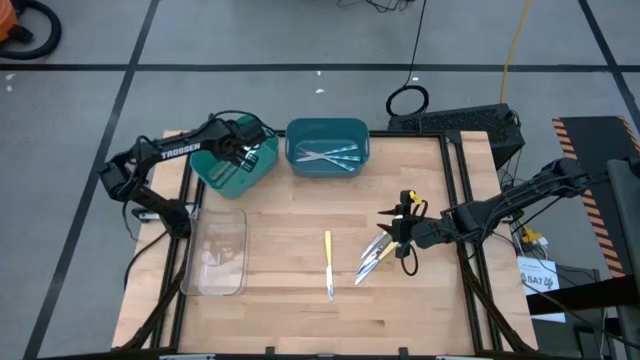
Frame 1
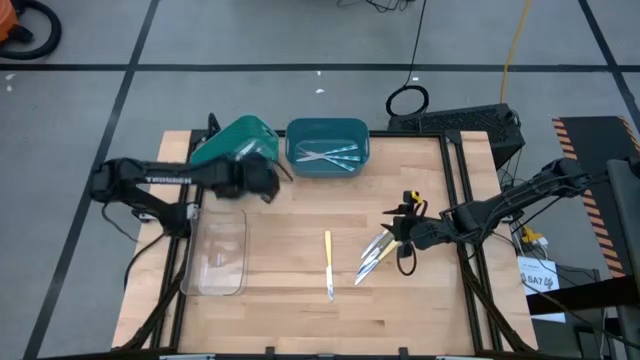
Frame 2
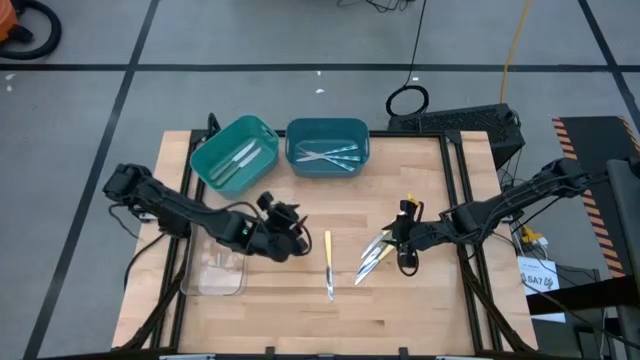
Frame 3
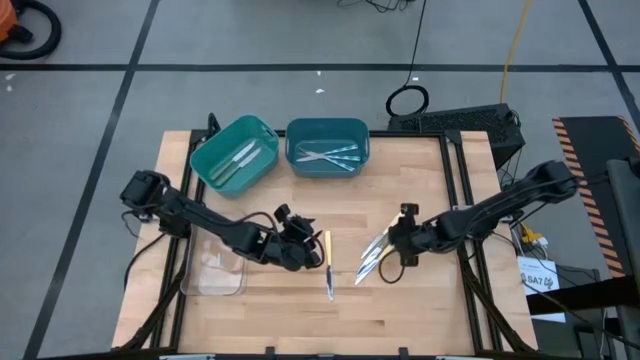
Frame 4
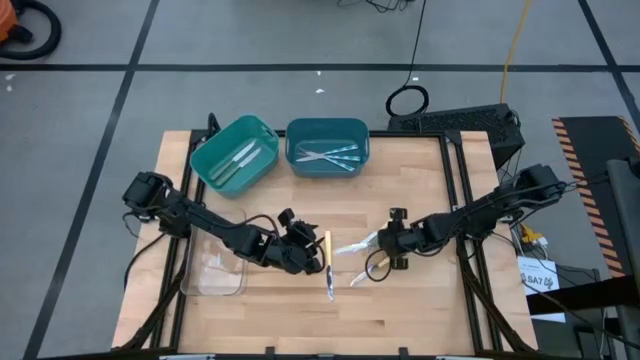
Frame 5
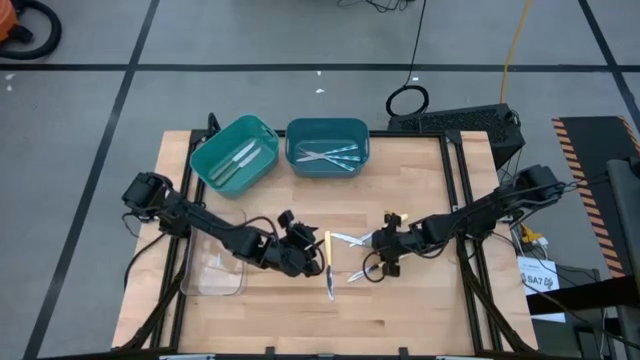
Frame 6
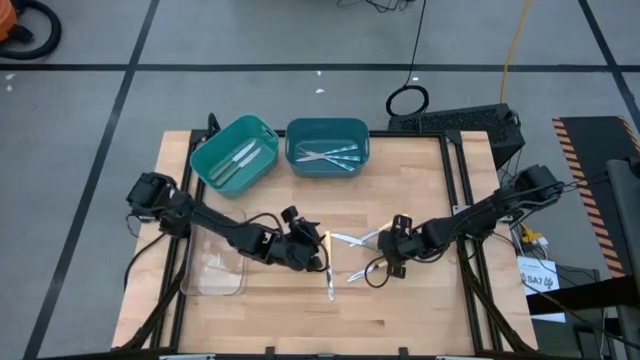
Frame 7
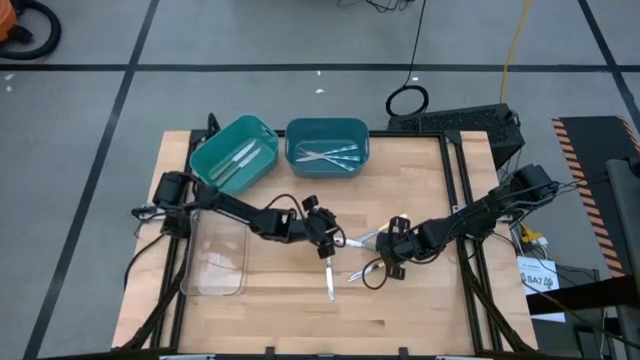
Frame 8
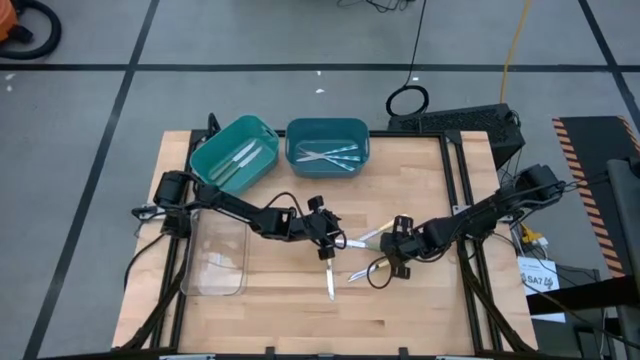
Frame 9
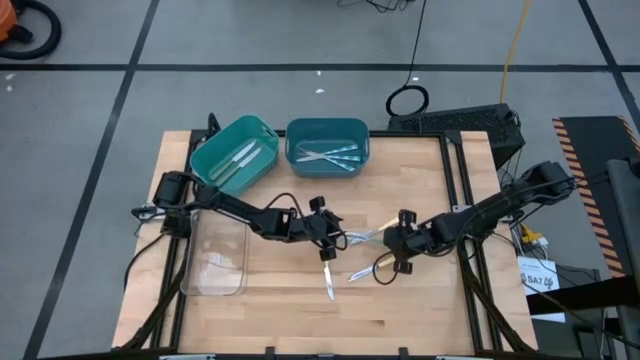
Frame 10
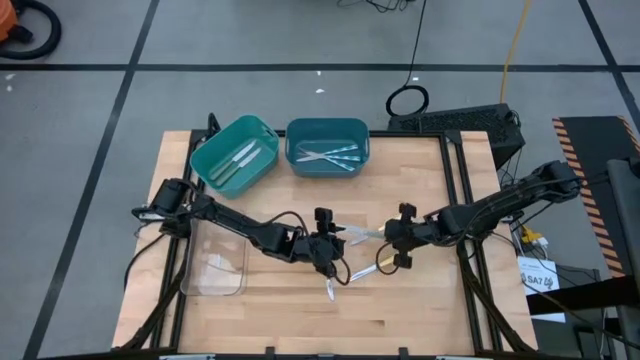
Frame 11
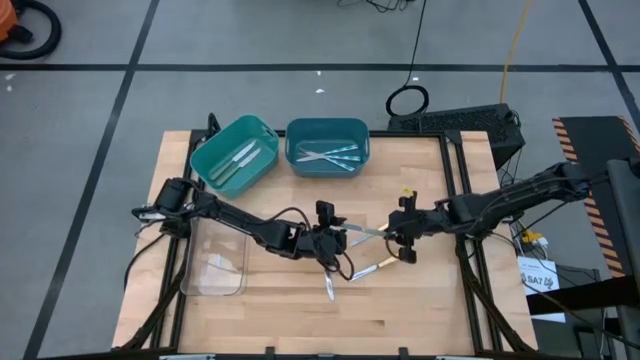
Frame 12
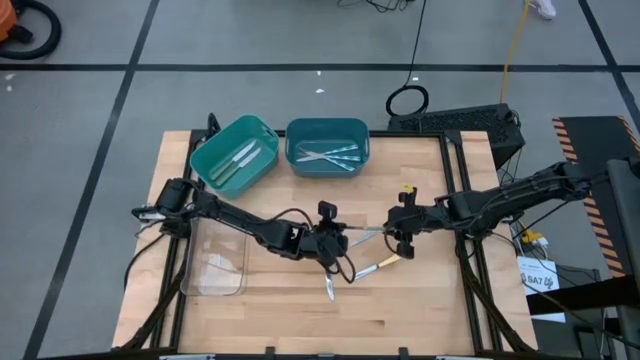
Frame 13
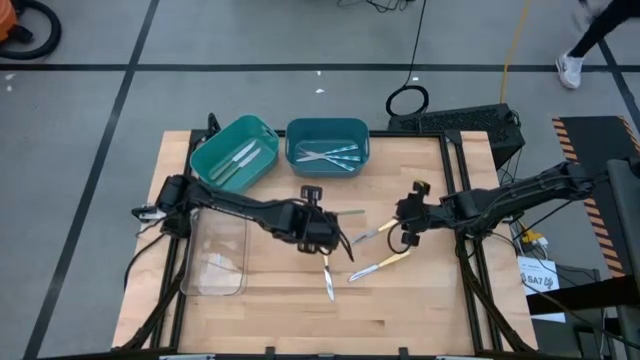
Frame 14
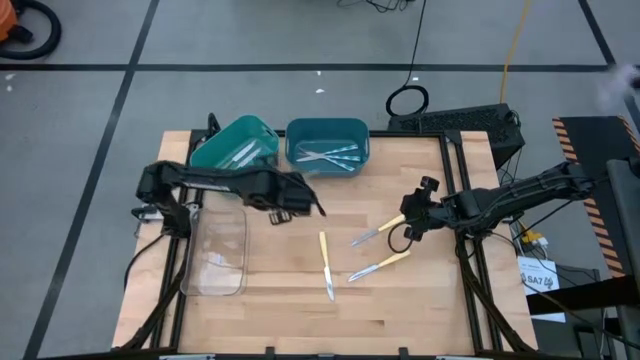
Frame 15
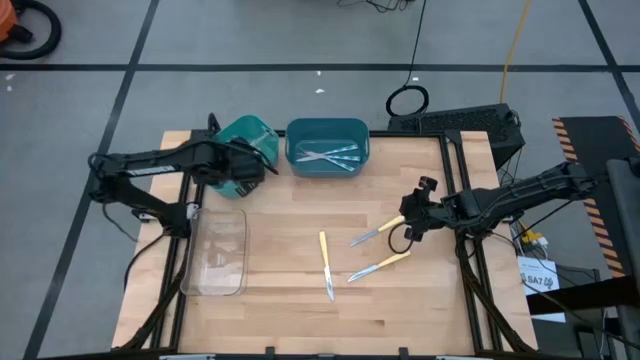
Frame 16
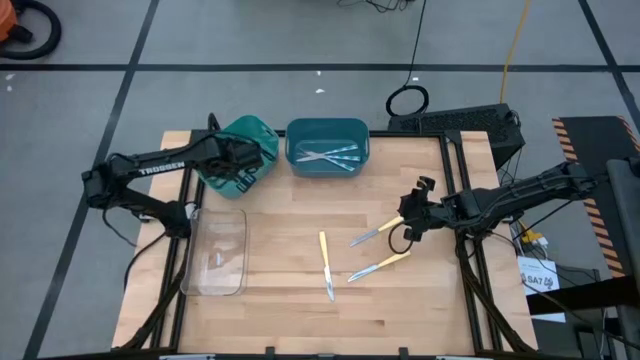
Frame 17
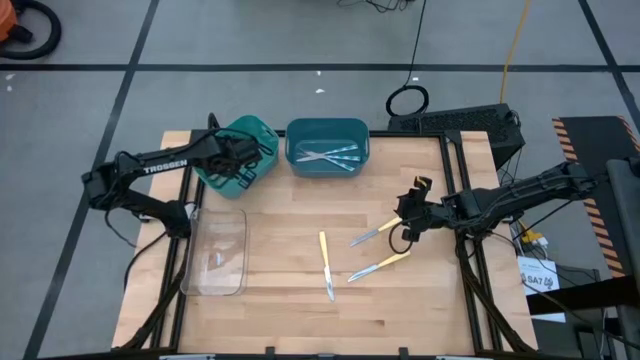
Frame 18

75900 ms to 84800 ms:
Task: Sort silverware by color (type)
Put the green table knife into the green bin

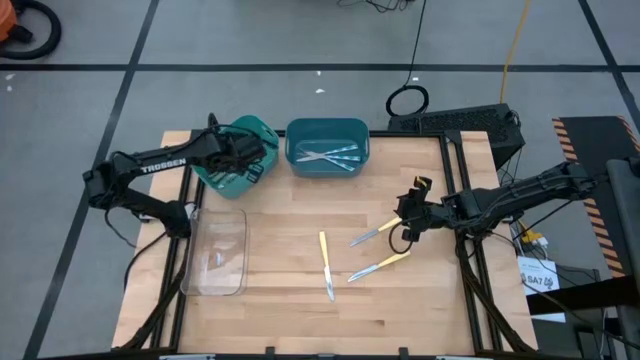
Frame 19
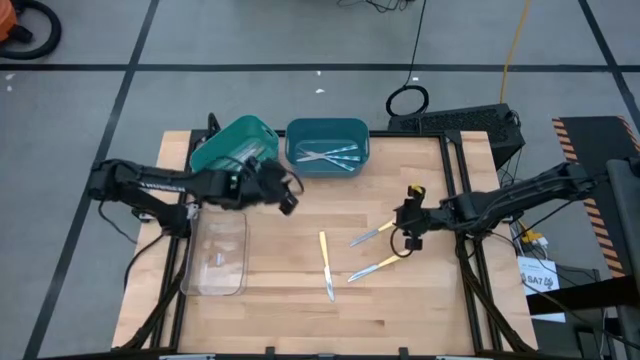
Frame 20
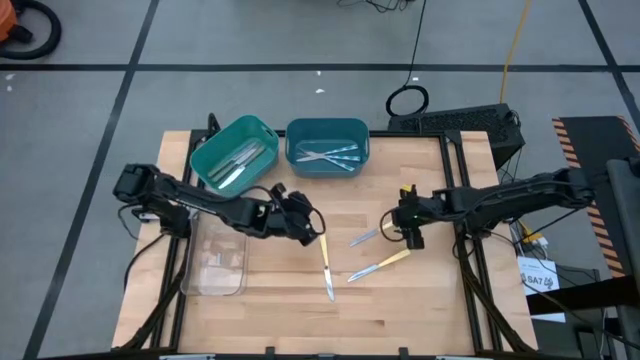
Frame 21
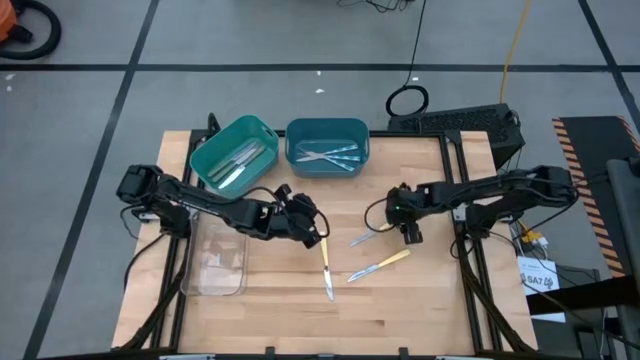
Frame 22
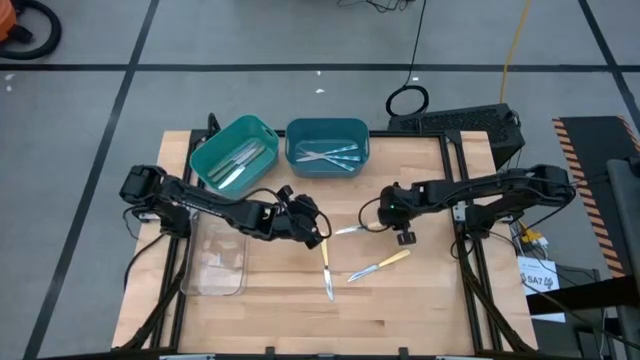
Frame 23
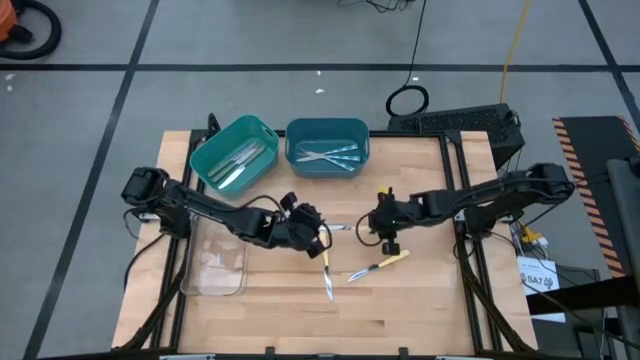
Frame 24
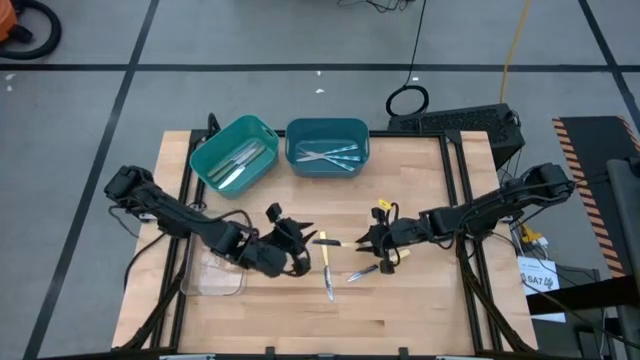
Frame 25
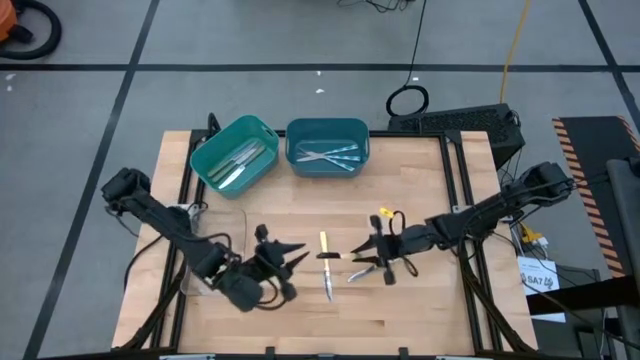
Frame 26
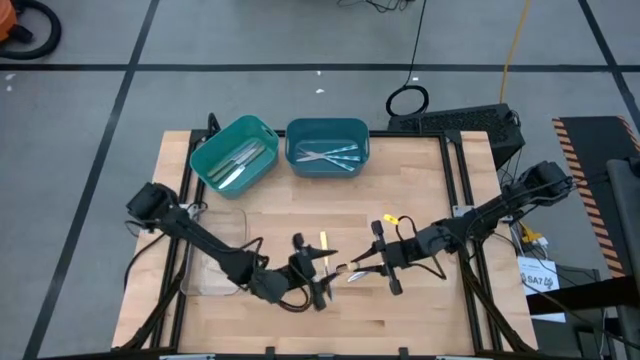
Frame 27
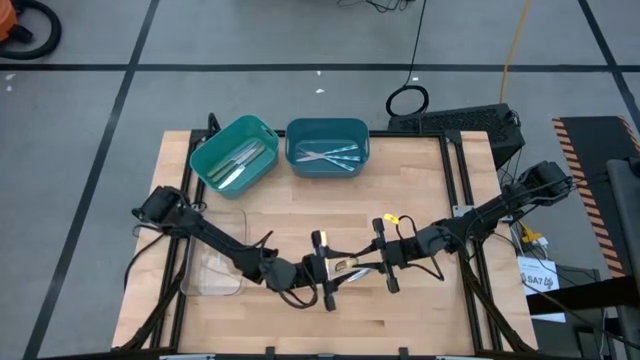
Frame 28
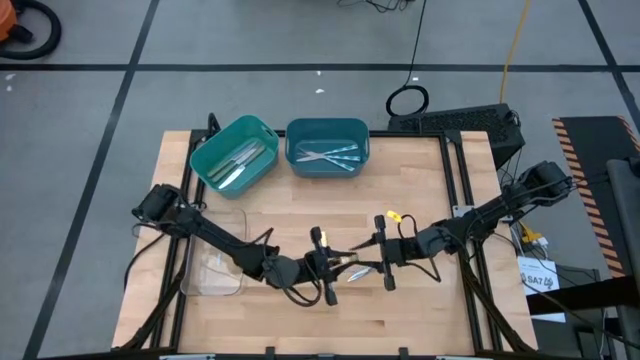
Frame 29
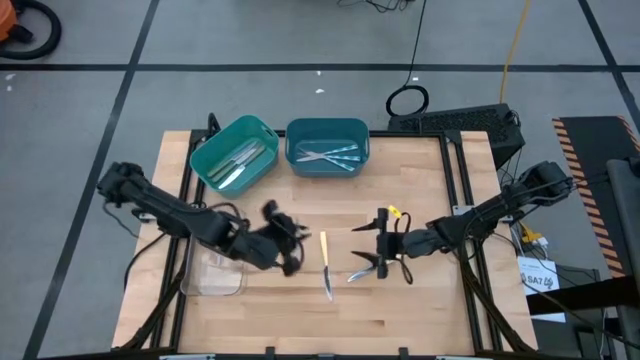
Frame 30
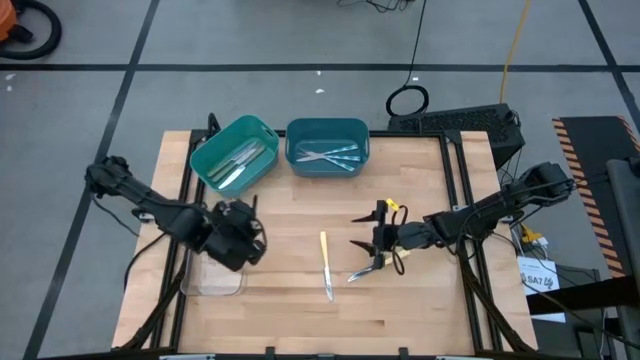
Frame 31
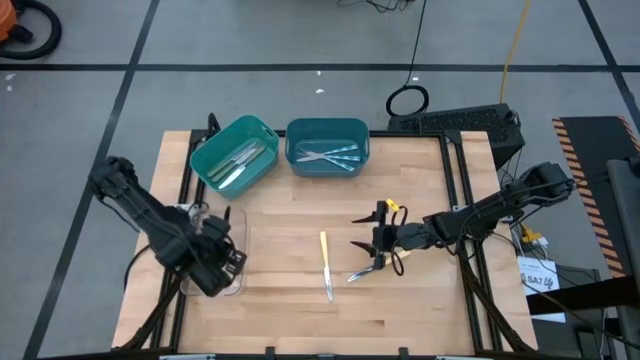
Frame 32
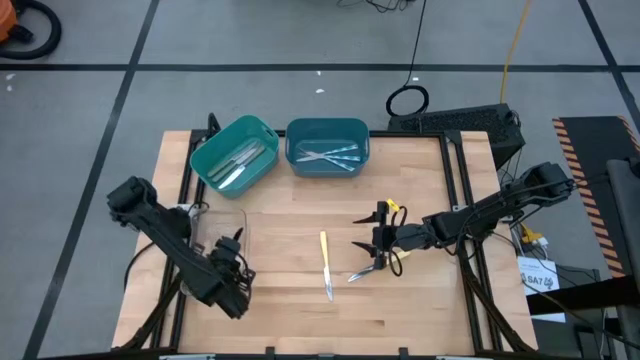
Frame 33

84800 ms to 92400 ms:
Put the top right yellow table knife into the transparent bin

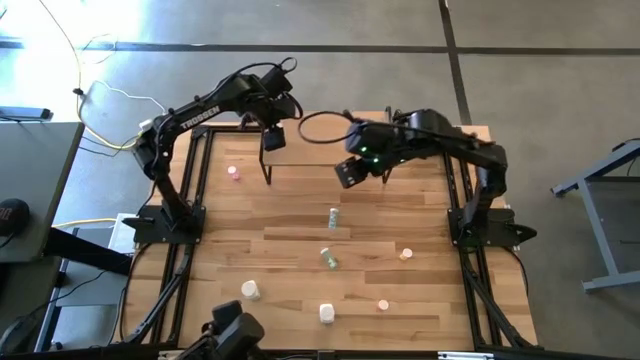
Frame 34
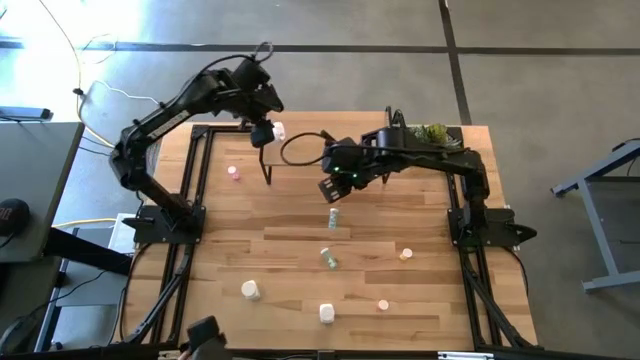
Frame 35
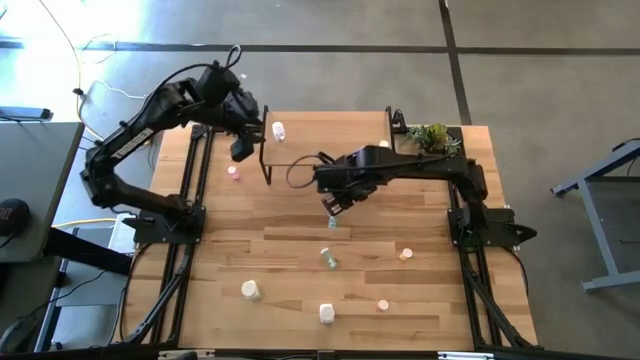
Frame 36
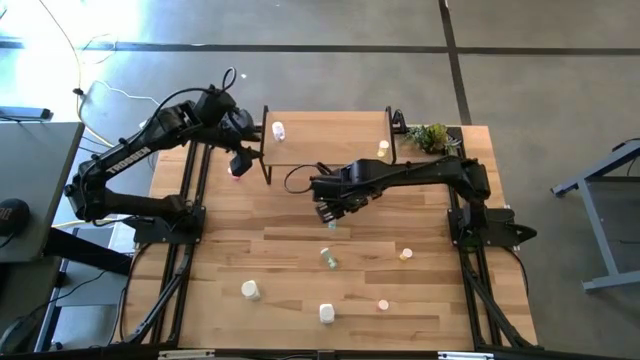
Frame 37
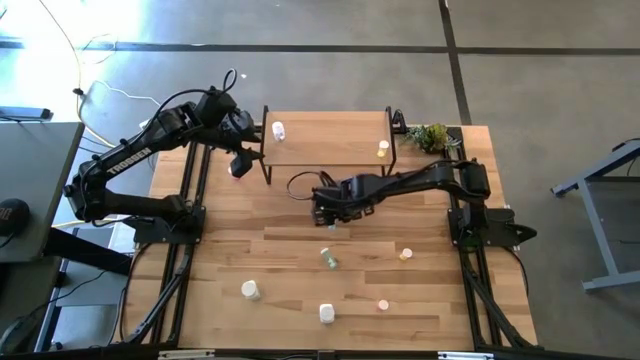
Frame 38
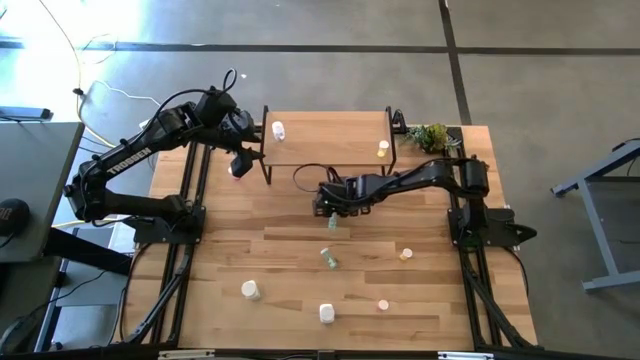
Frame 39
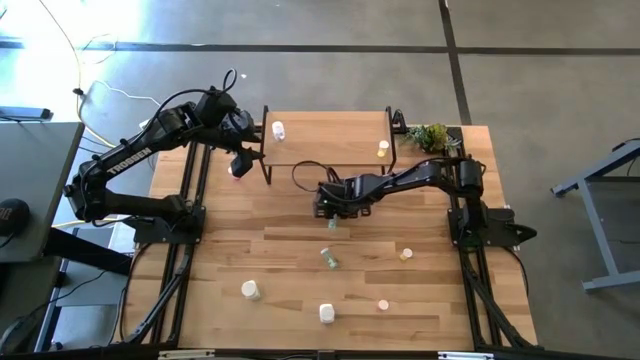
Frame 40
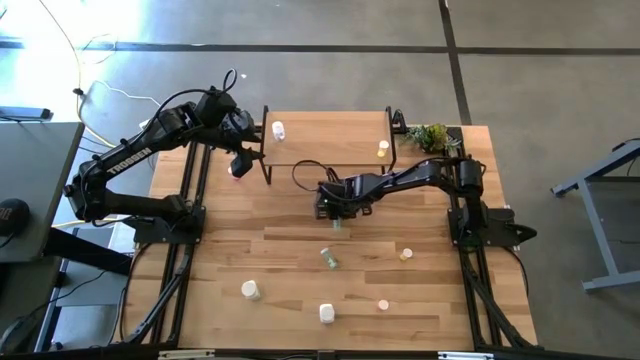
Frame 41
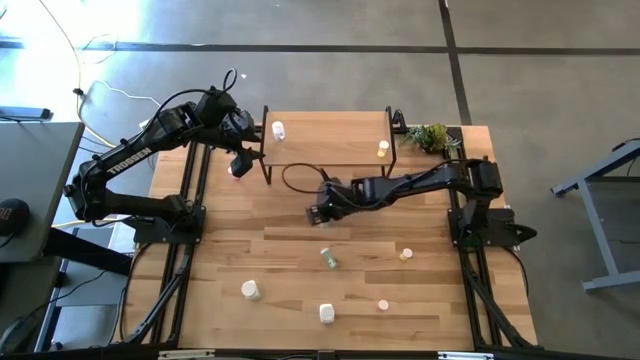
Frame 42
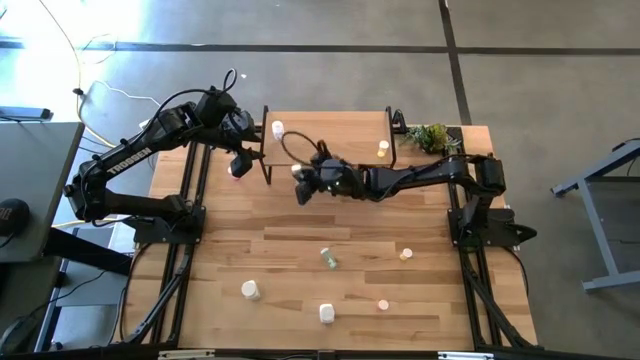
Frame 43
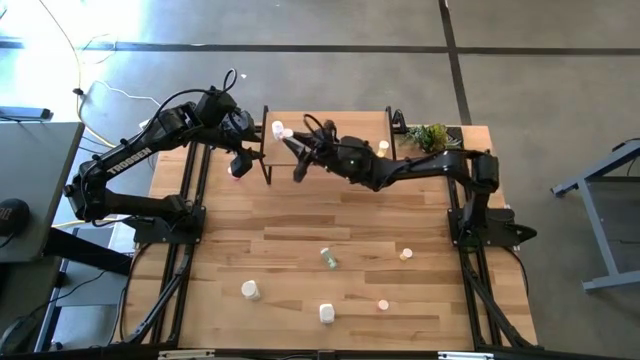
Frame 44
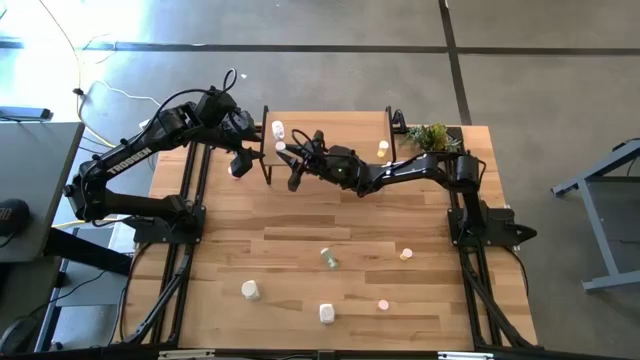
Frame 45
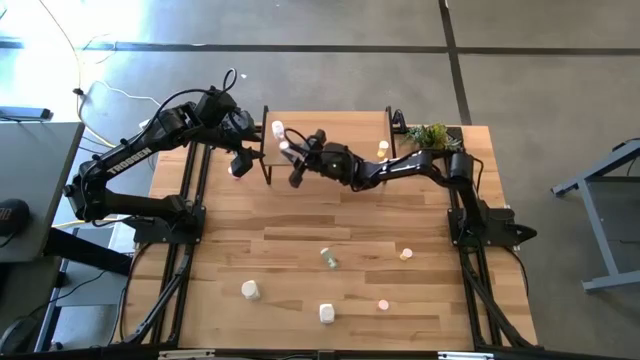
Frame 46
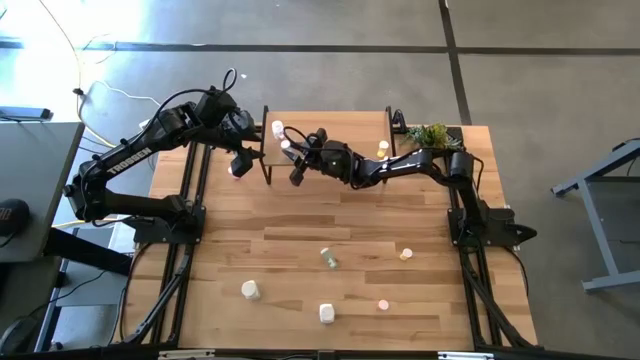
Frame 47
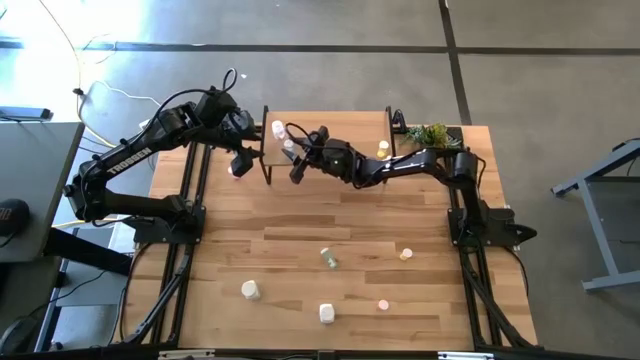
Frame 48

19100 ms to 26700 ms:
Task: Pick and place medicine bottles onto shelf by color
Put the top blue medicine bottle on the shelf
